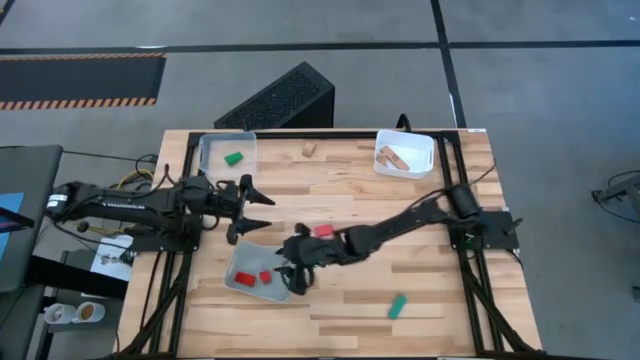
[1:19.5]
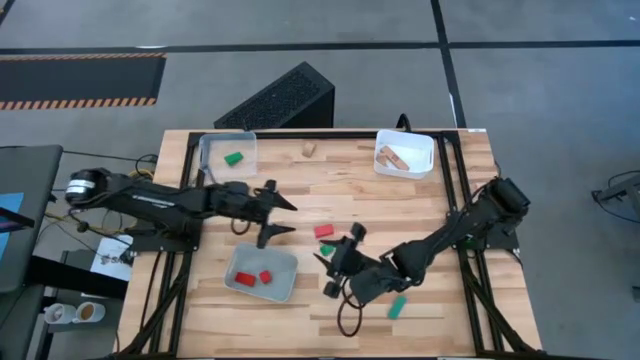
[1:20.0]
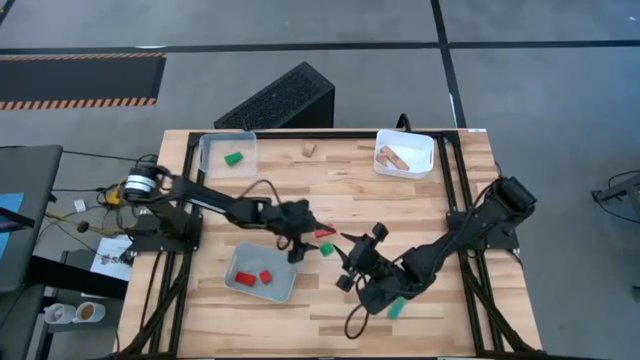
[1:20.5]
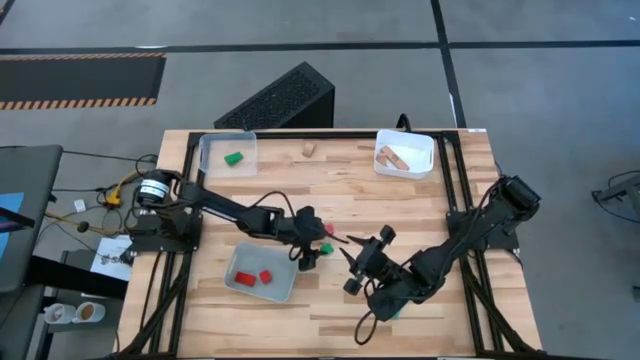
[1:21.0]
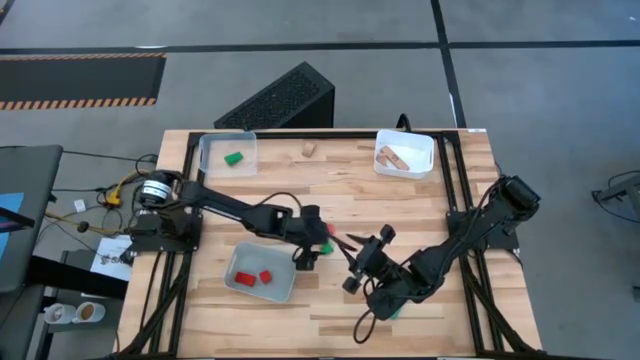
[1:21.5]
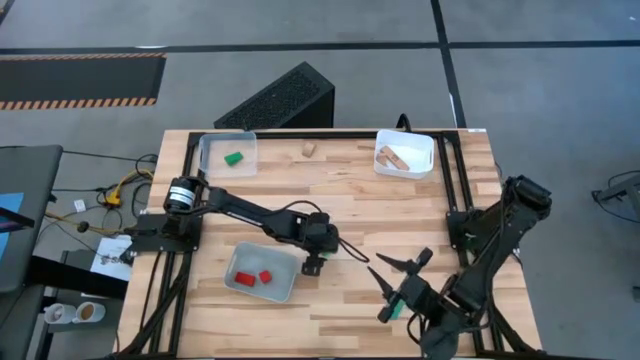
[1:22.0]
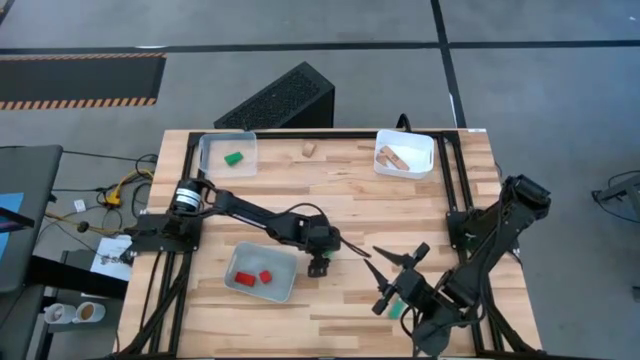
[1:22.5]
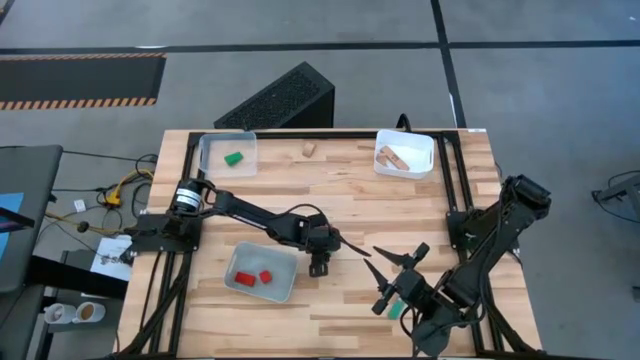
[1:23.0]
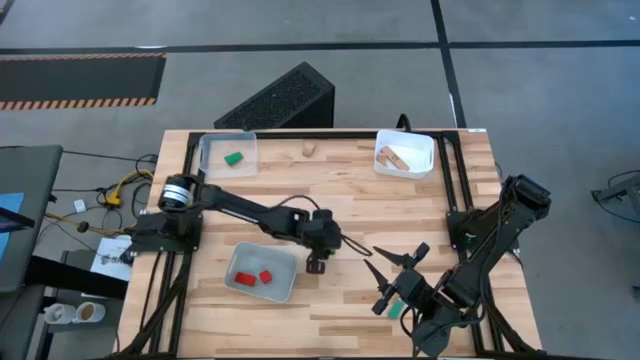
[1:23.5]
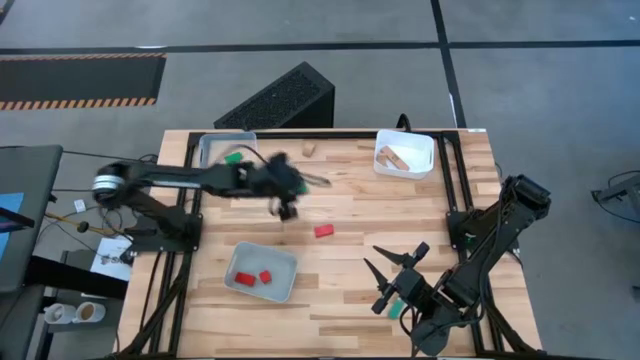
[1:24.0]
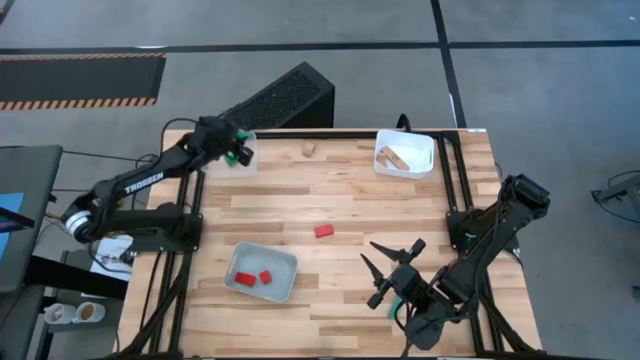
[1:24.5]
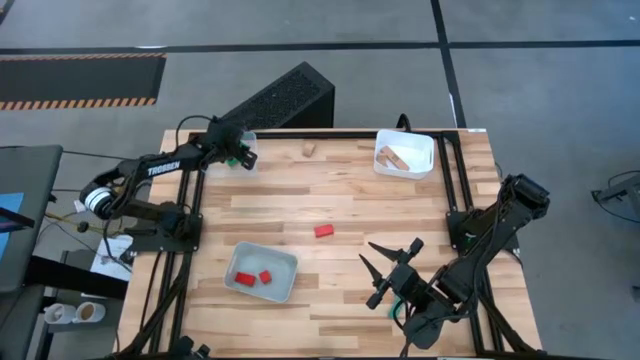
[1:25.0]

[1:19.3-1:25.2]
Task: Sort & place blocks by color
Put the top green block into the transparent bin

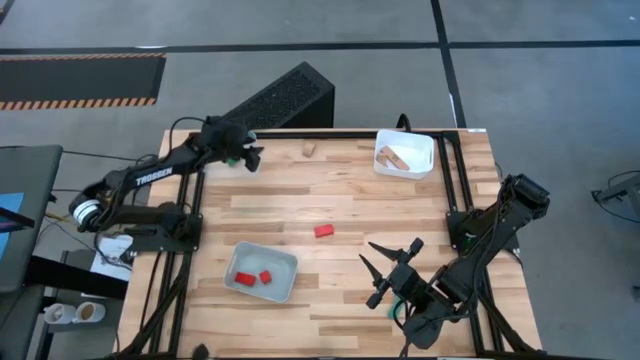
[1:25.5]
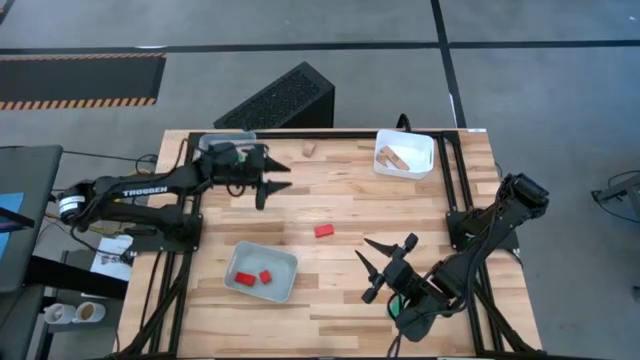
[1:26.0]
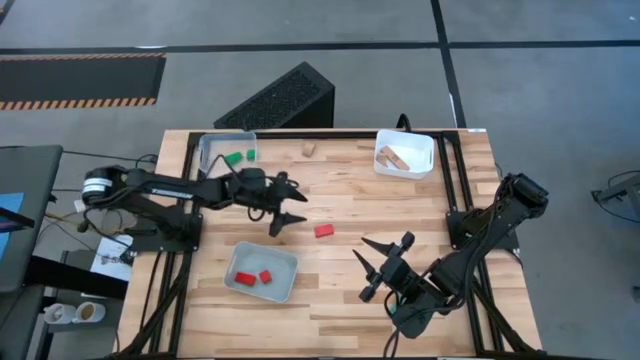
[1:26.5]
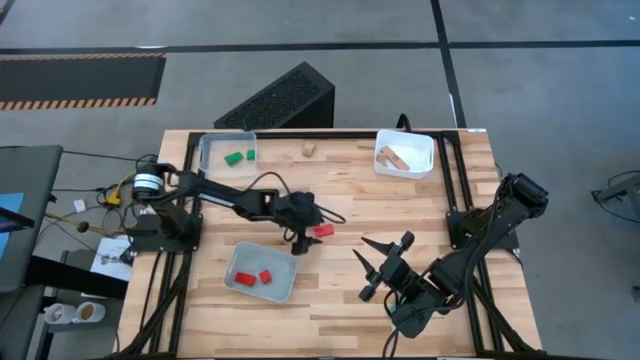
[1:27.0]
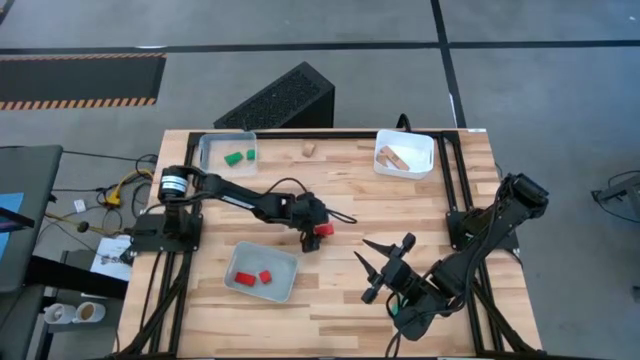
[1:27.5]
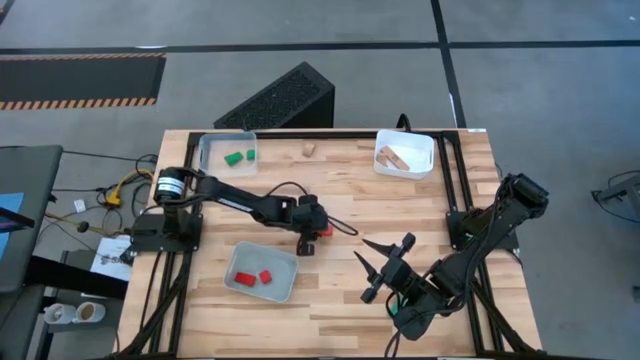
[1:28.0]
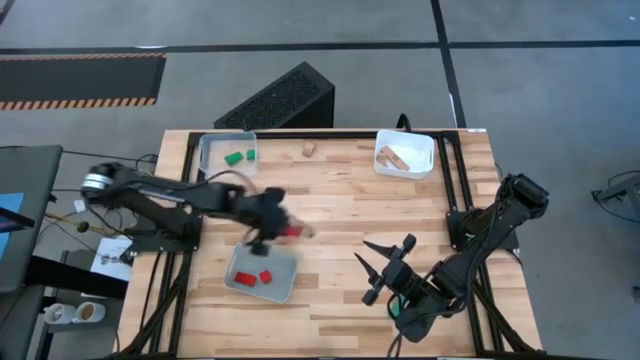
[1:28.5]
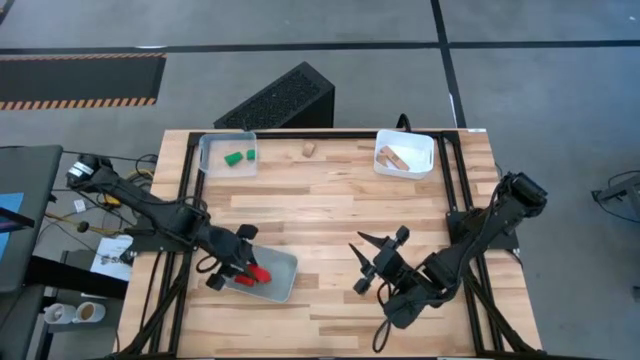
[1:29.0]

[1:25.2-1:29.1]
Put the red block into the gray bin

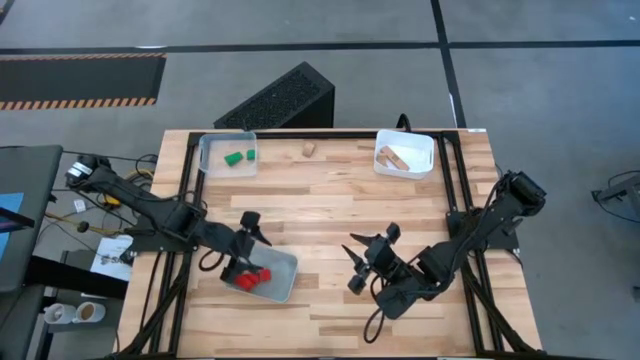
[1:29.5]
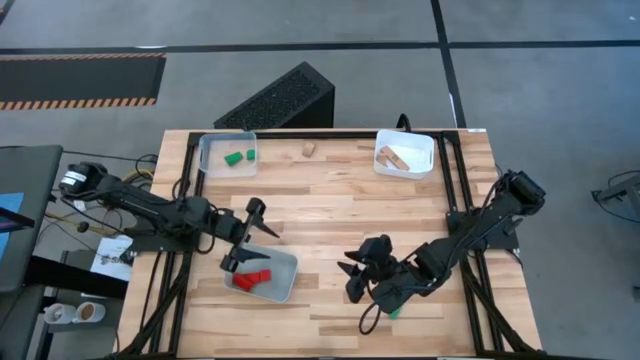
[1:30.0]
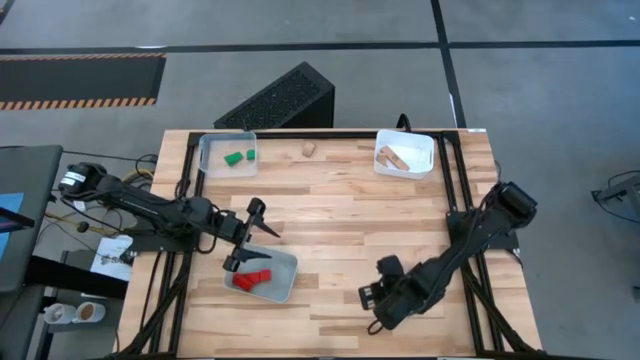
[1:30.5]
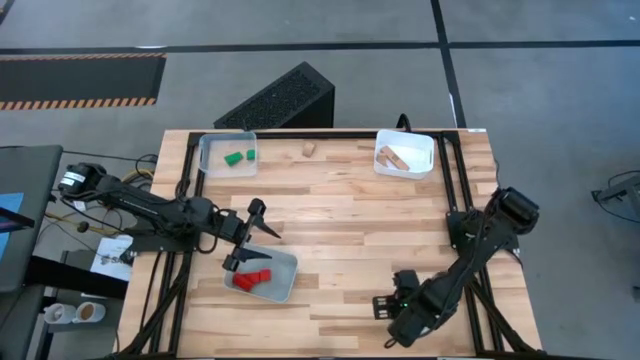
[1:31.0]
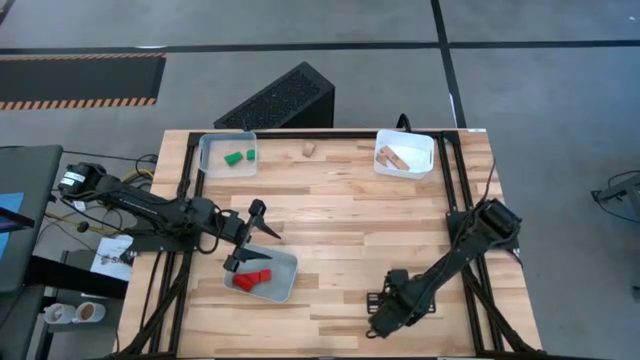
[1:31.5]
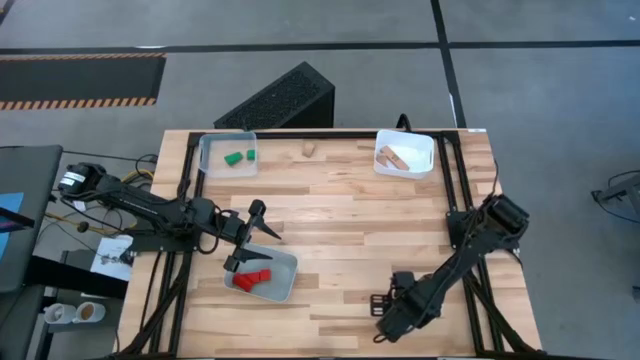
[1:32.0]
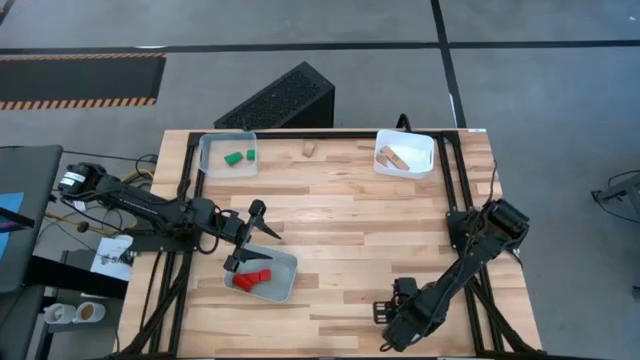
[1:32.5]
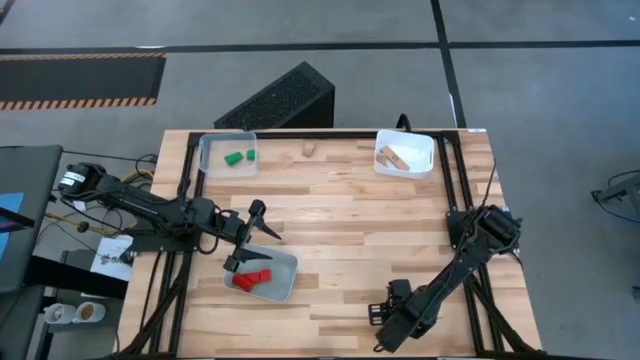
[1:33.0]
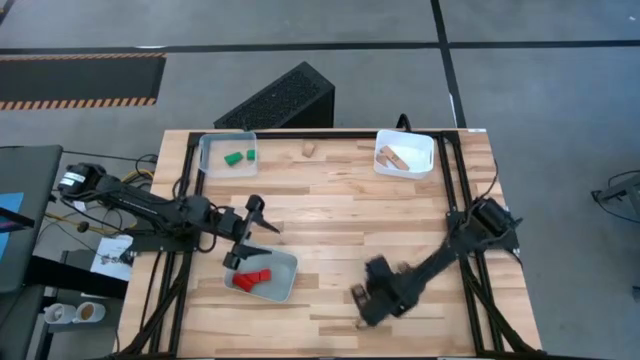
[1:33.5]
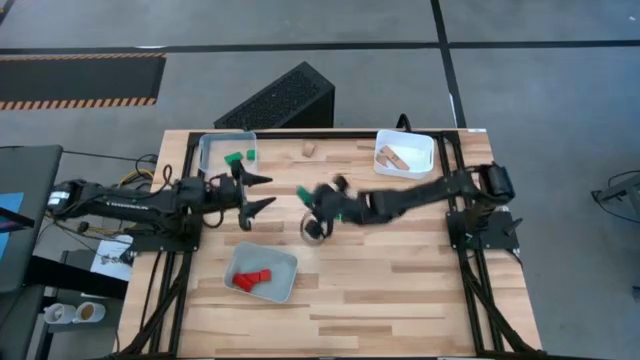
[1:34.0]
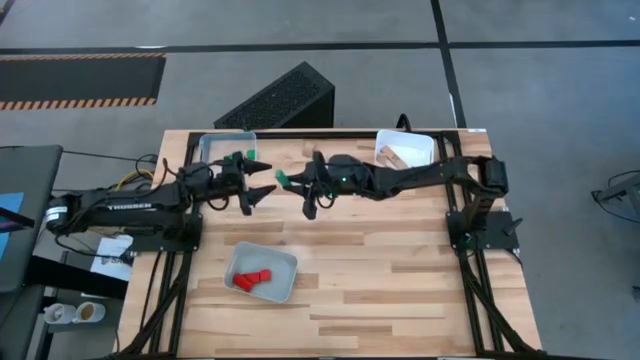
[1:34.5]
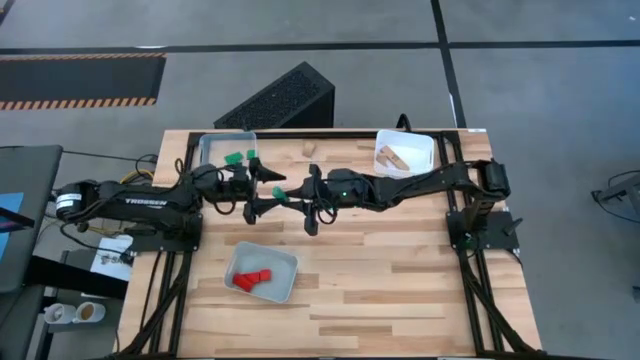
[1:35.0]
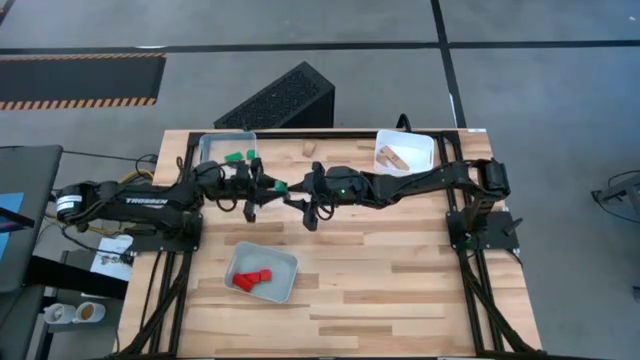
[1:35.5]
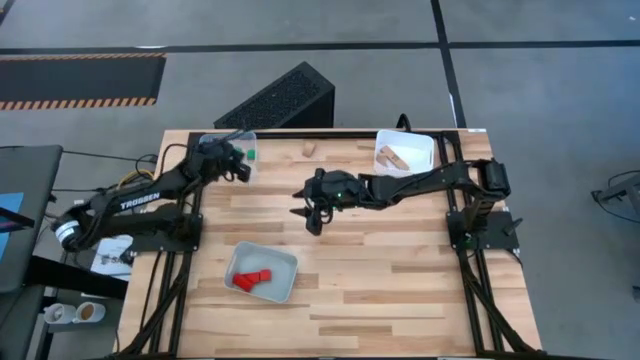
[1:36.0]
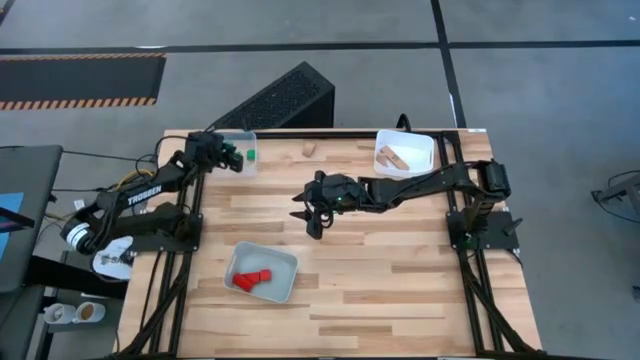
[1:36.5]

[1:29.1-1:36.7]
Put the green block into the transparent bin

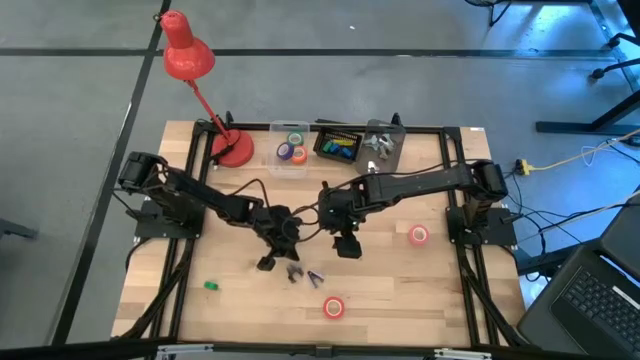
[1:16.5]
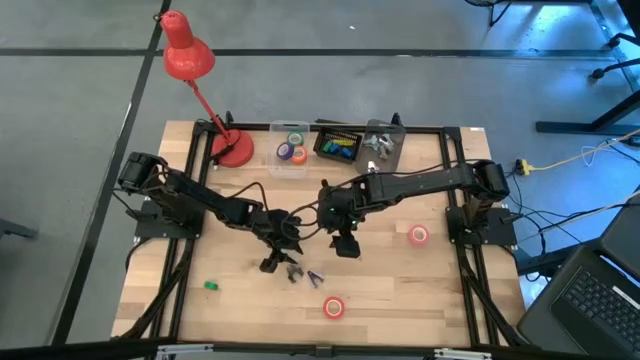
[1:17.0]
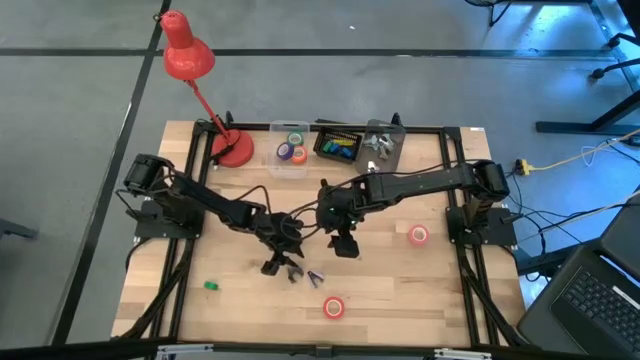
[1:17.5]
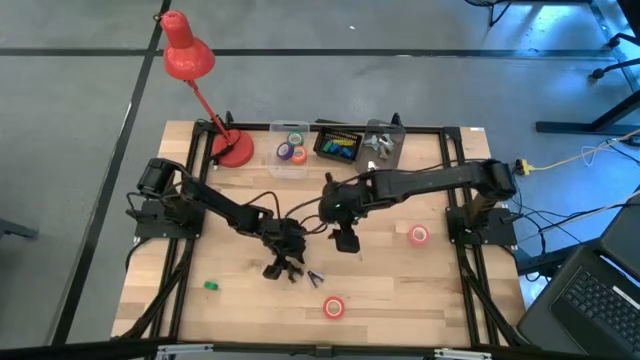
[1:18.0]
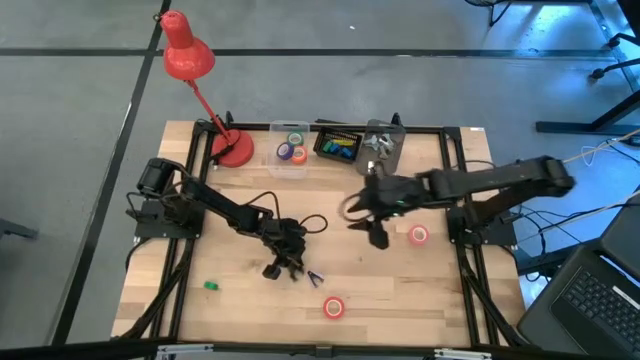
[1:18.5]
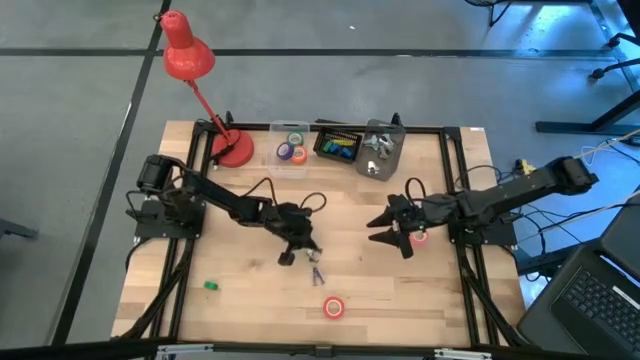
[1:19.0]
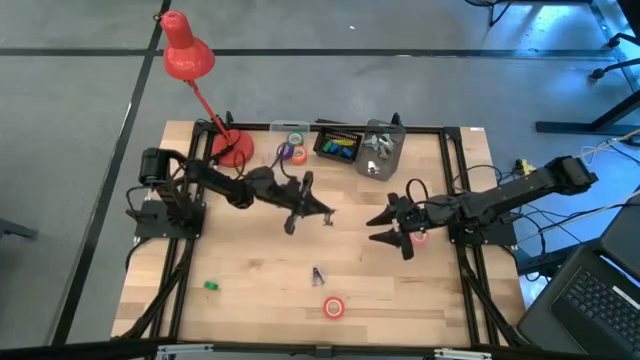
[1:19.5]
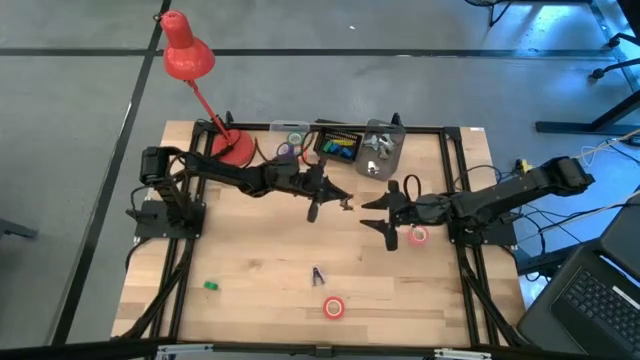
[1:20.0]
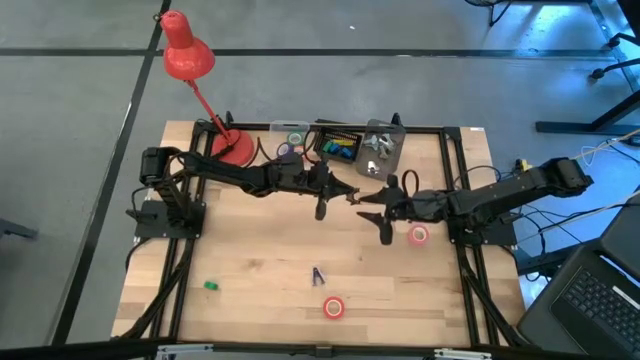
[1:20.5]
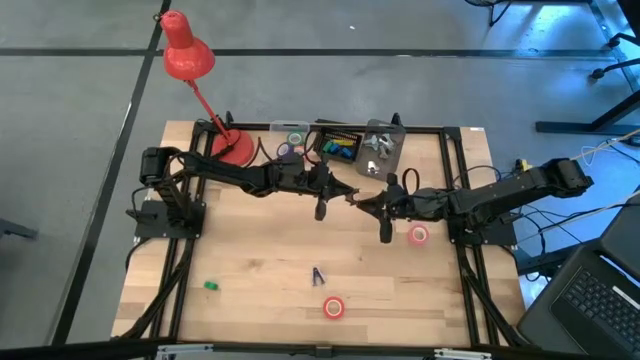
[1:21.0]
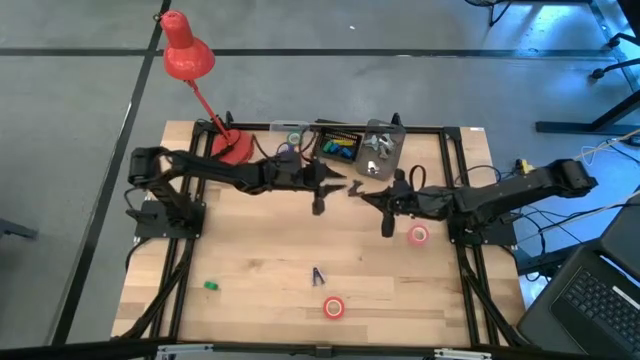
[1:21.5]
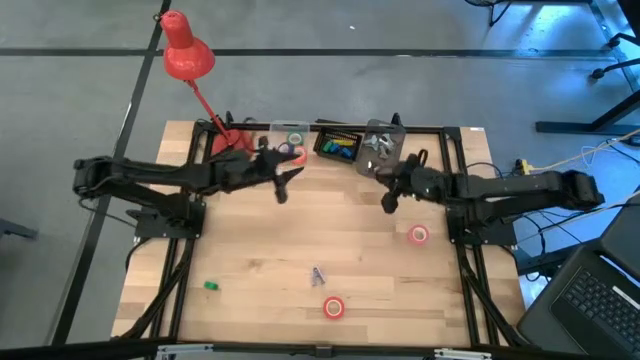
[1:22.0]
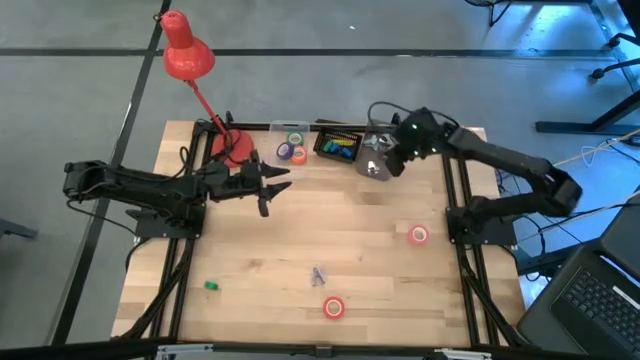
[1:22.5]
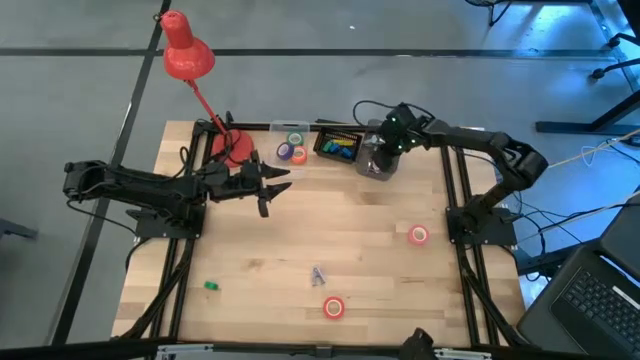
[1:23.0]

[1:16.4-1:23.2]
Task: Pick and place Stapler, Stapler remover, tape
Put the black staple remover into the right black bin
